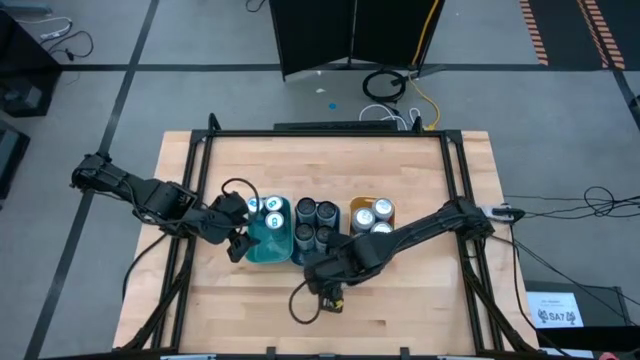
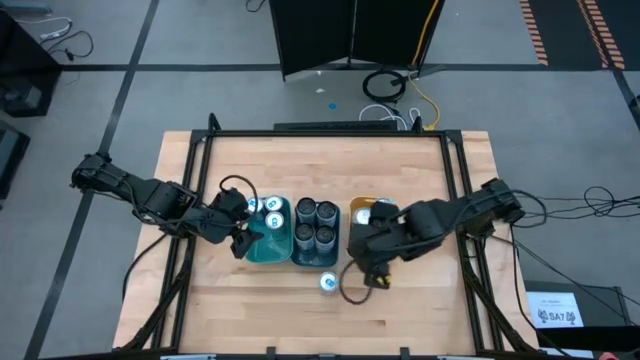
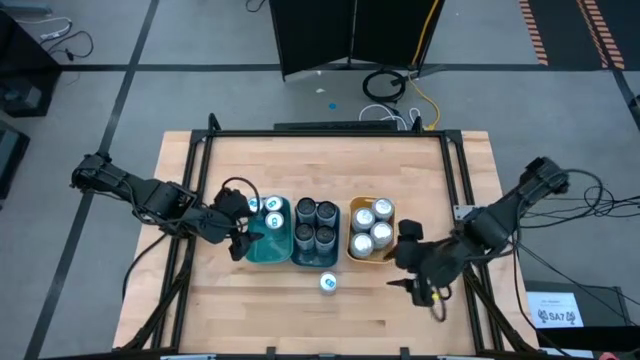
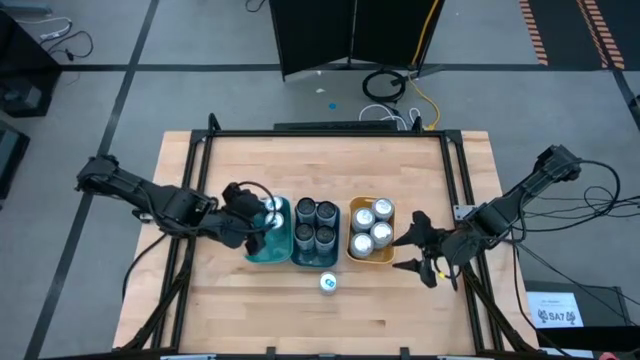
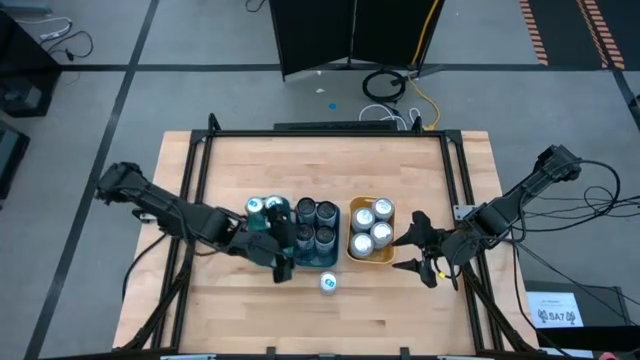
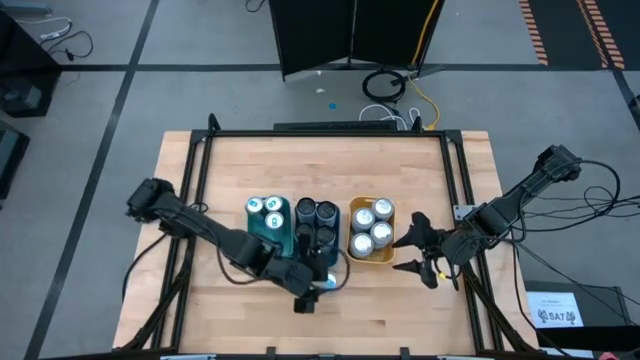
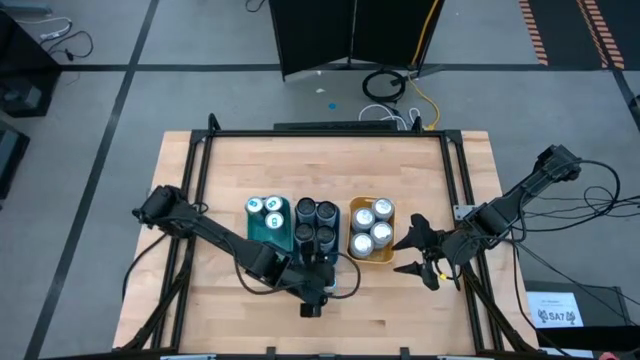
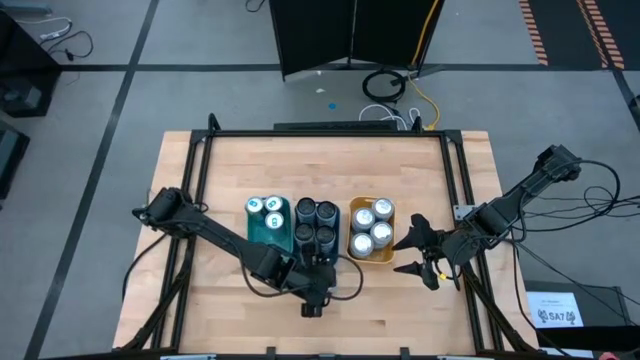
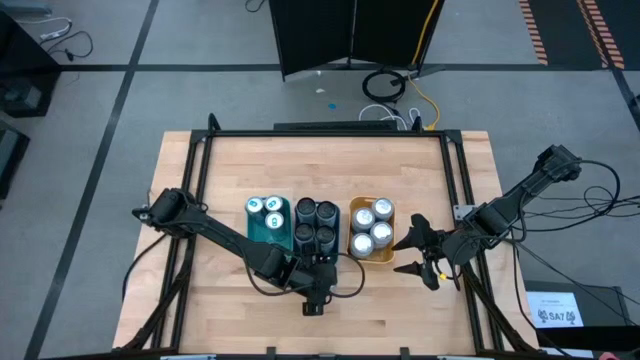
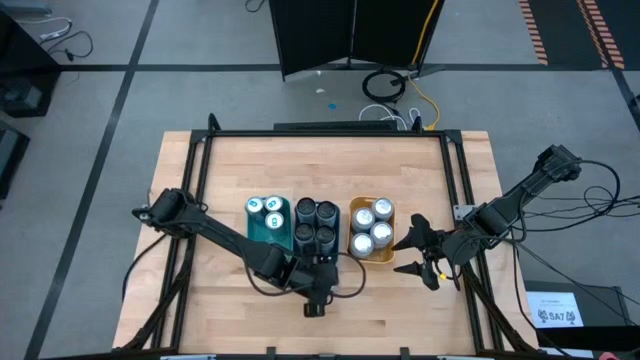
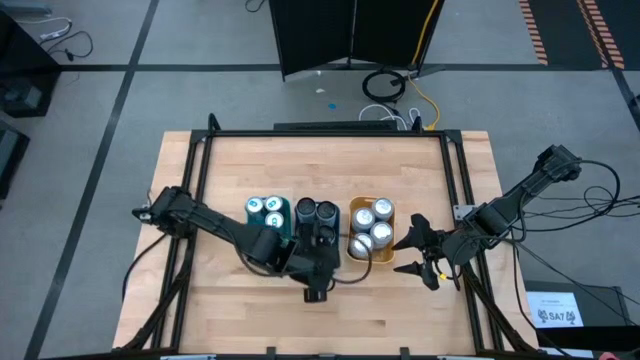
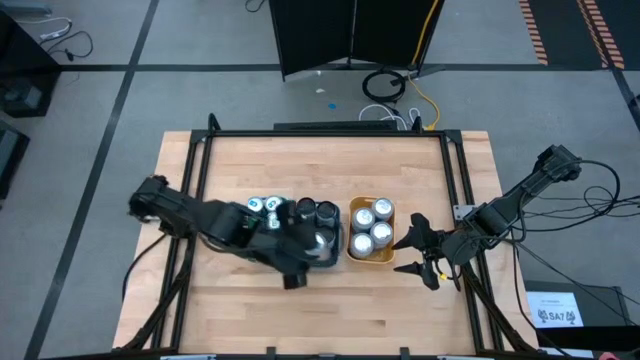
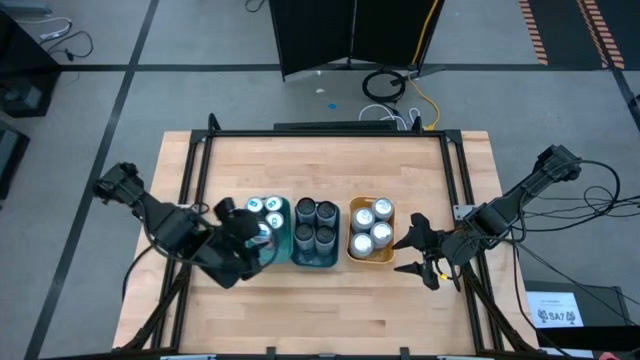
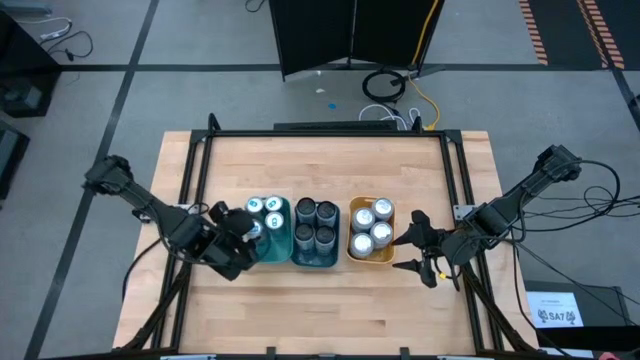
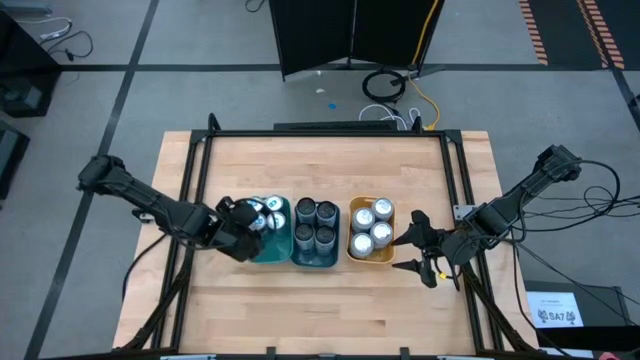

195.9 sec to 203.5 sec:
Task: Sort soda cans
Put the blue soda can into the green bin

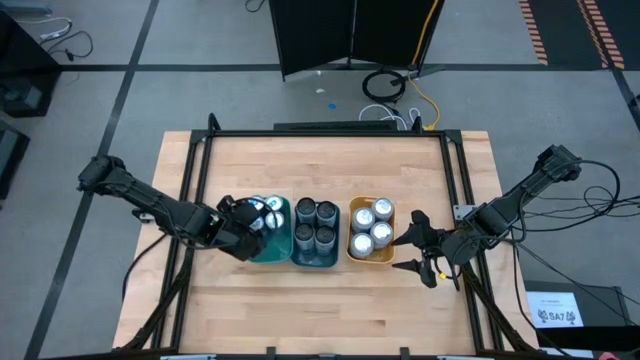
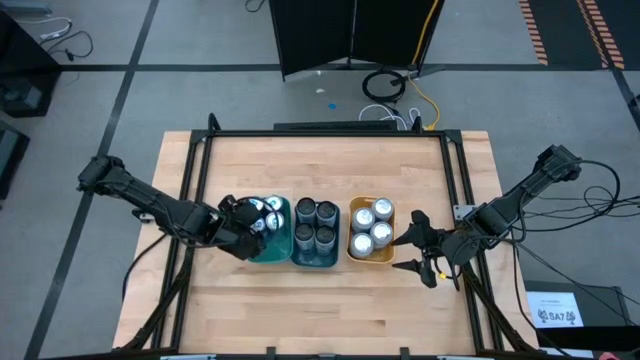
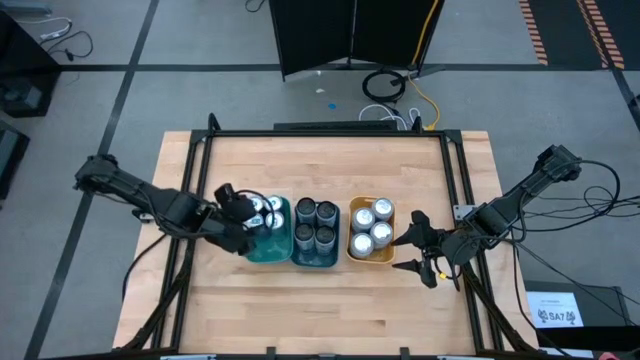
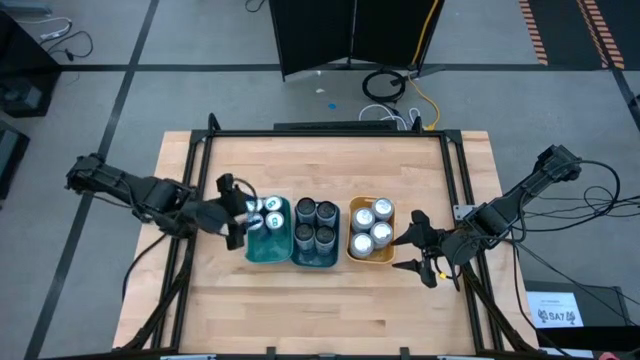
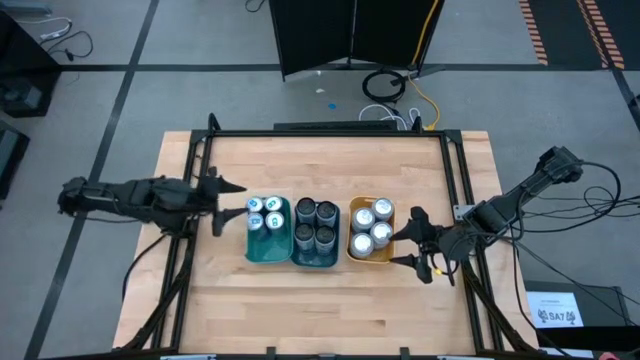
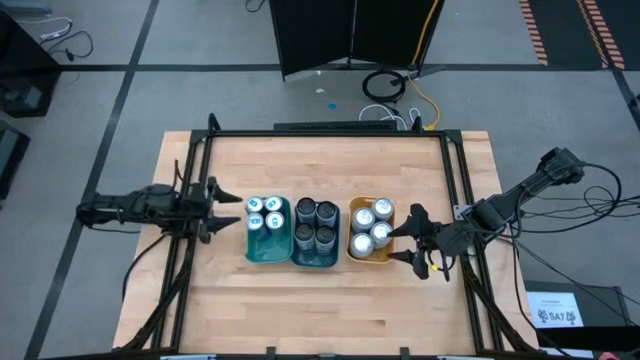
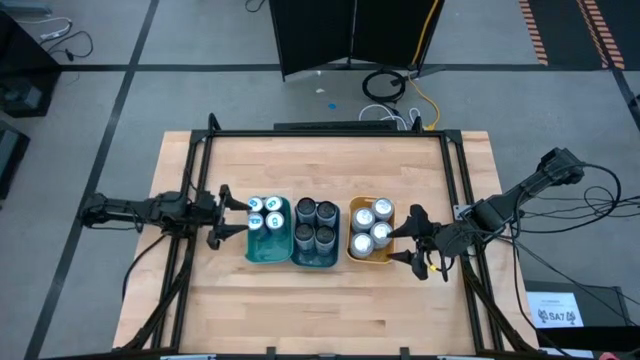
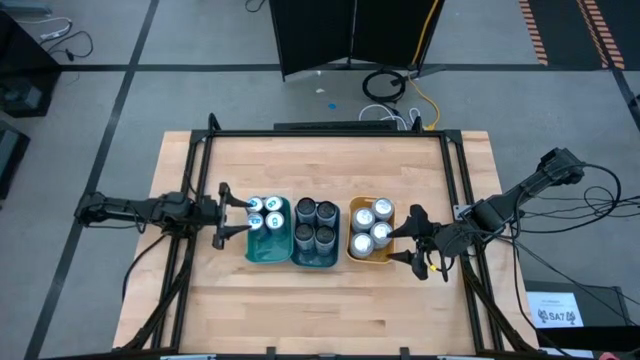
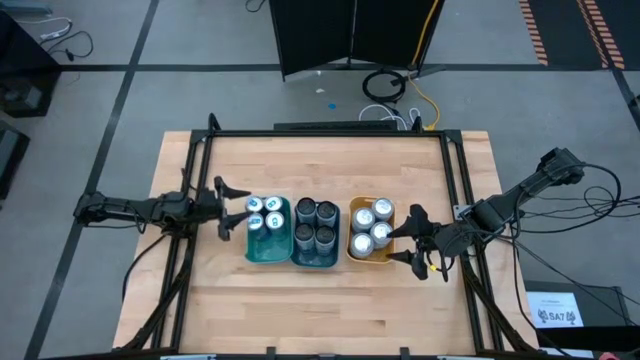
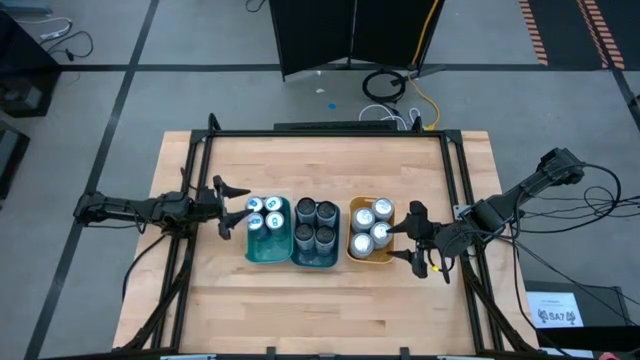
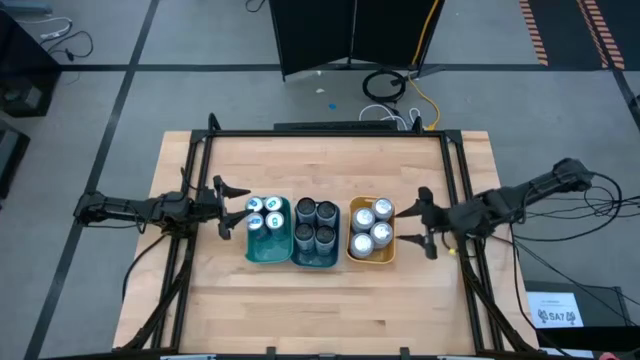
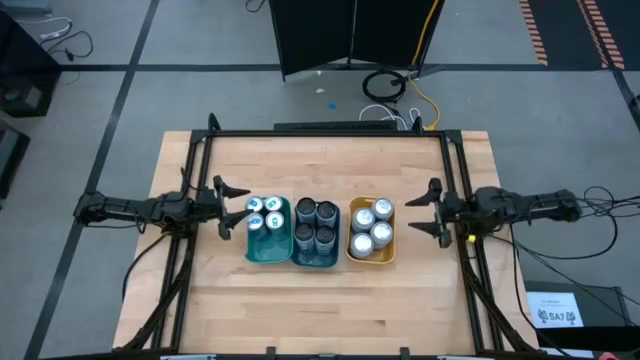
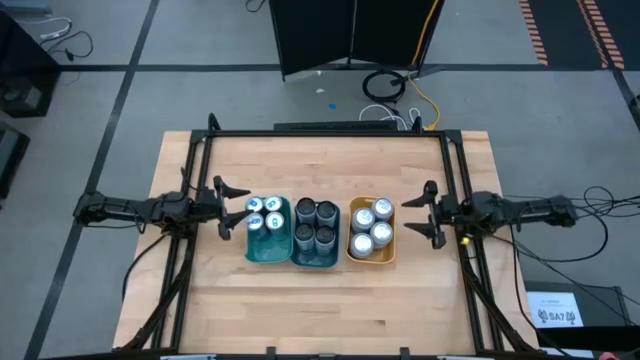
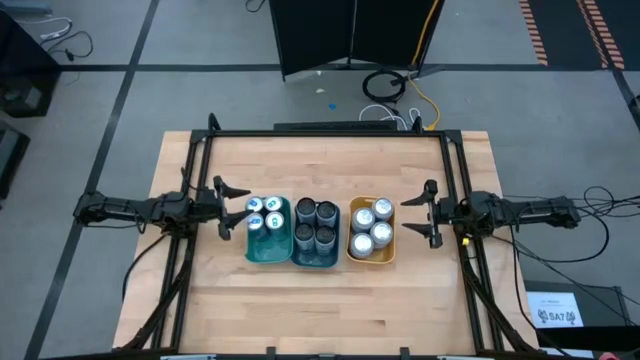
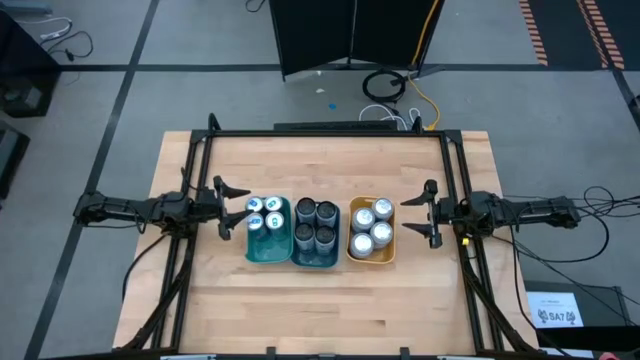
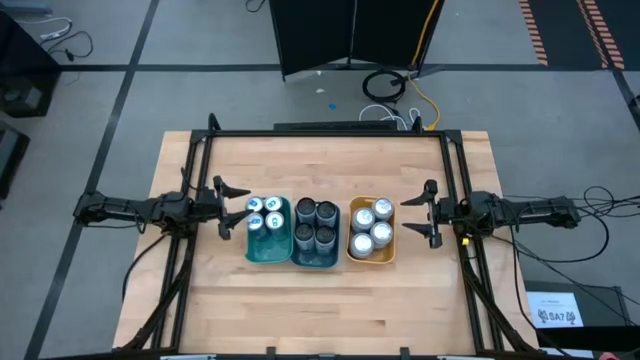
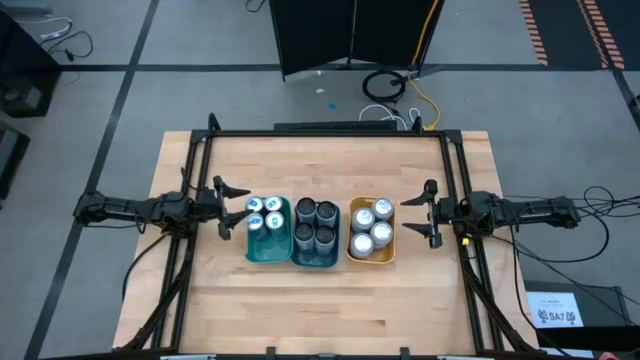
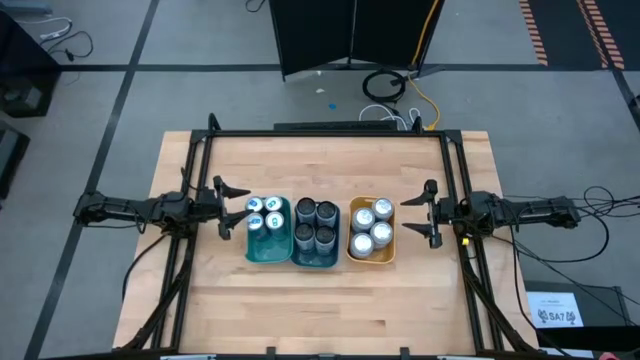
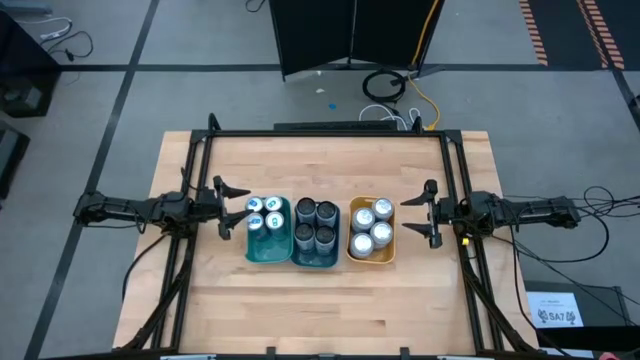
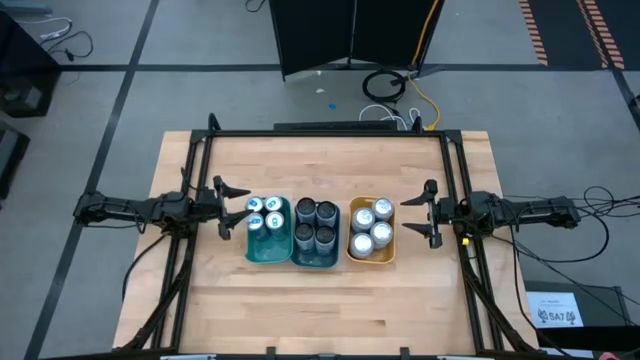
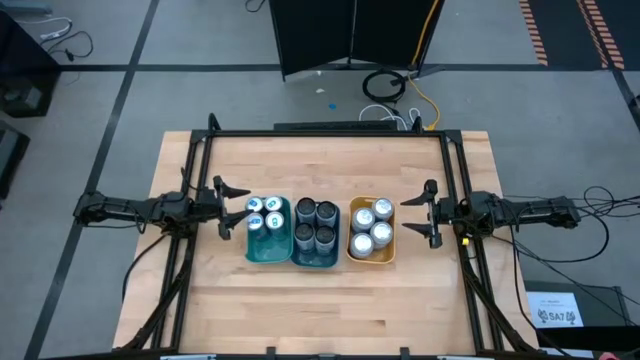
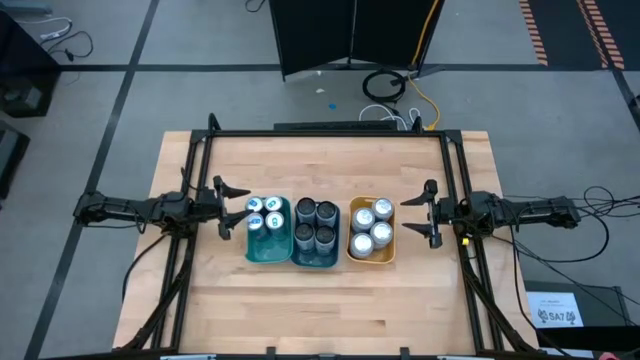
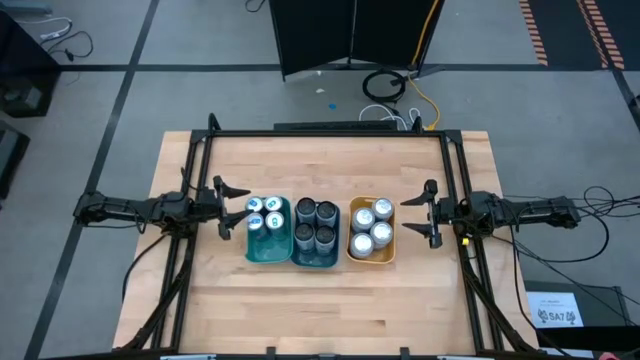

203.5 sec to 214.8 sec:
Return to Home Position

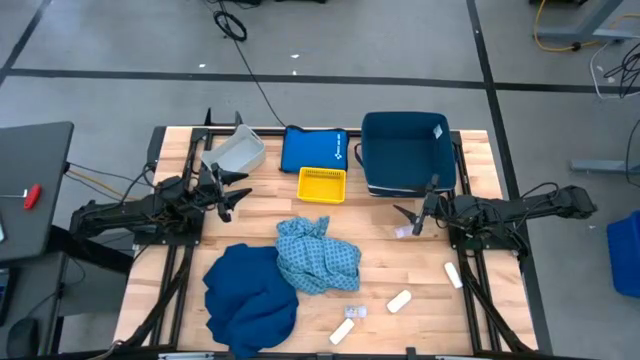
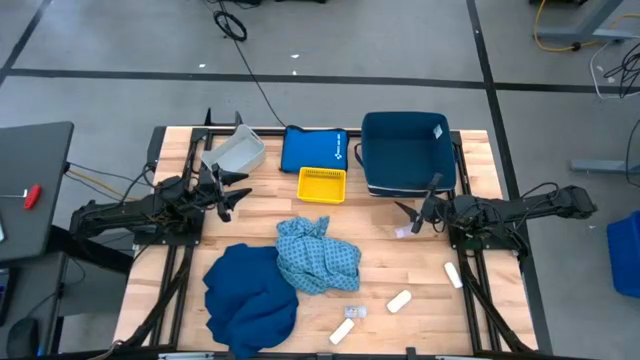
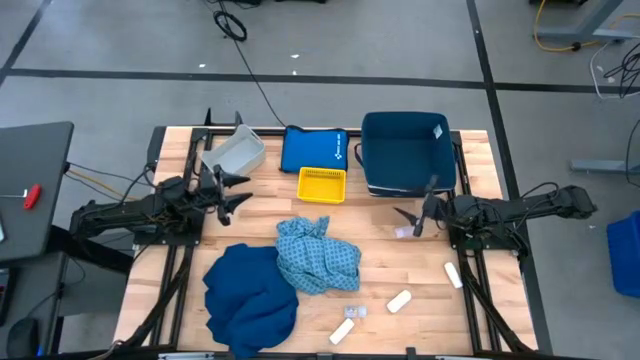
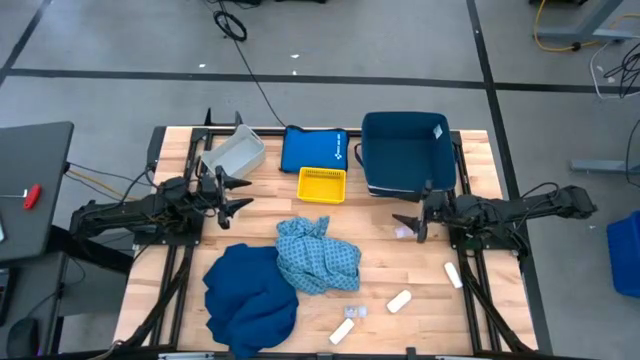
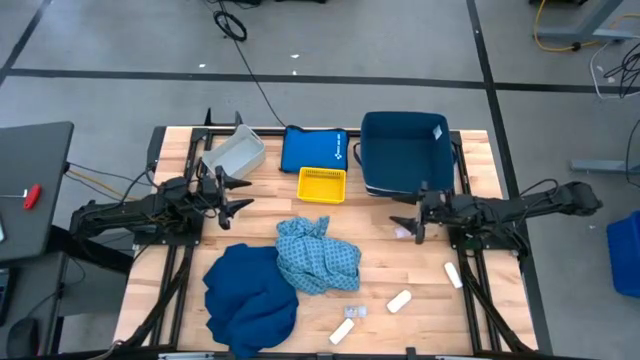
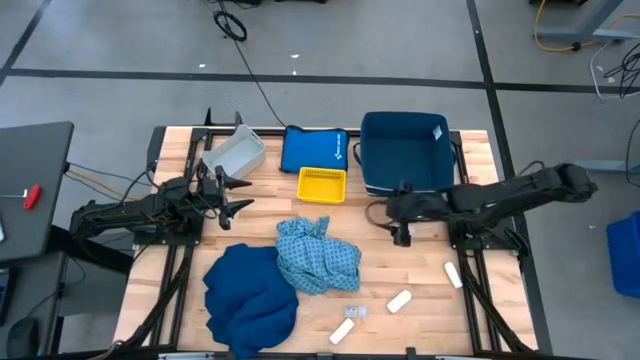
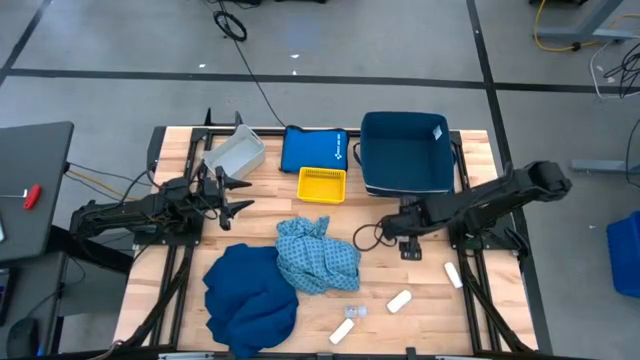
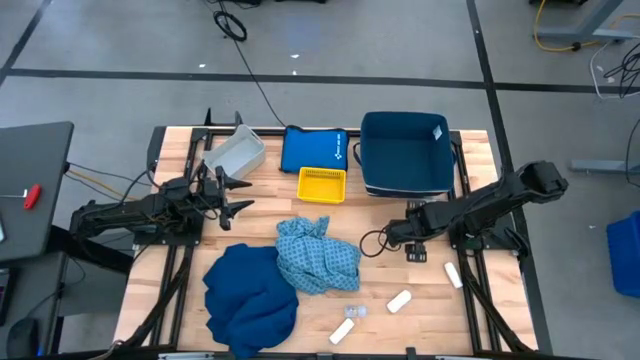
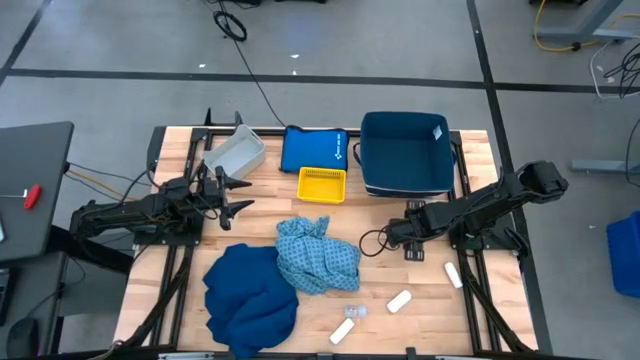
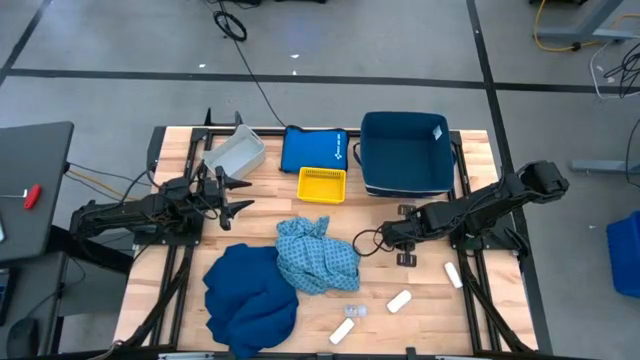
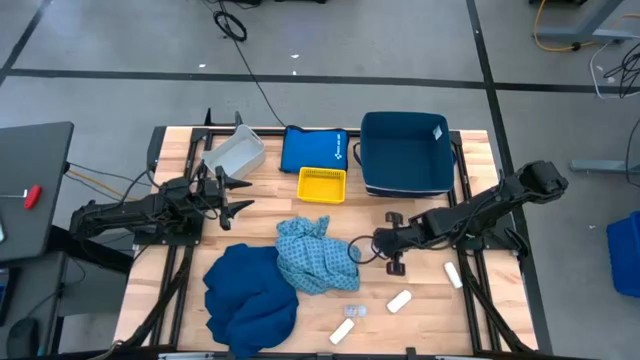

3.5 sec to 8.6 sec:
Task: Pick & place medical supplies in basket/bin
Put the top transparent pill bottle into the gray bin
